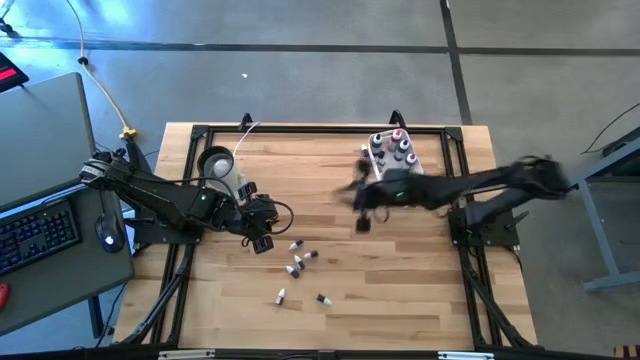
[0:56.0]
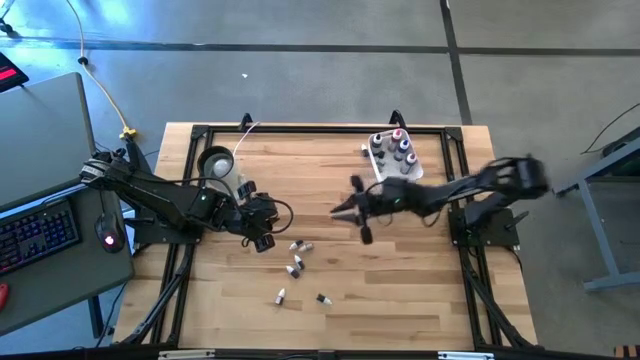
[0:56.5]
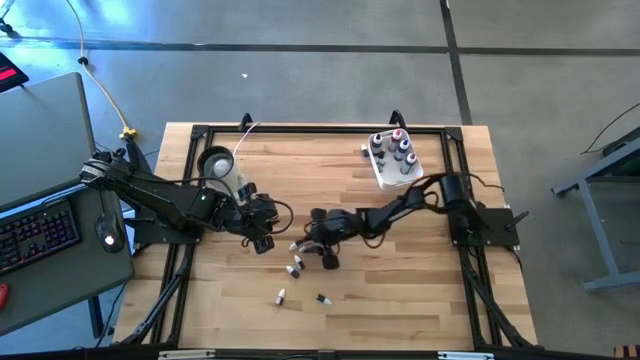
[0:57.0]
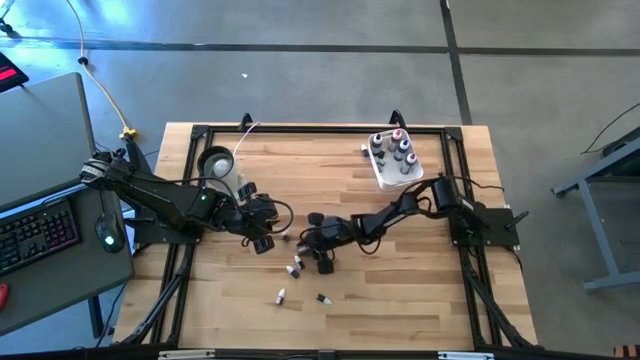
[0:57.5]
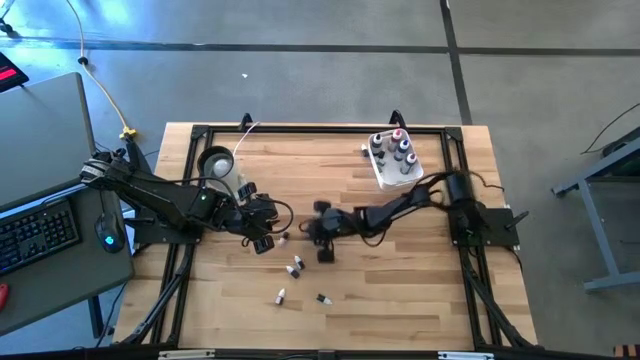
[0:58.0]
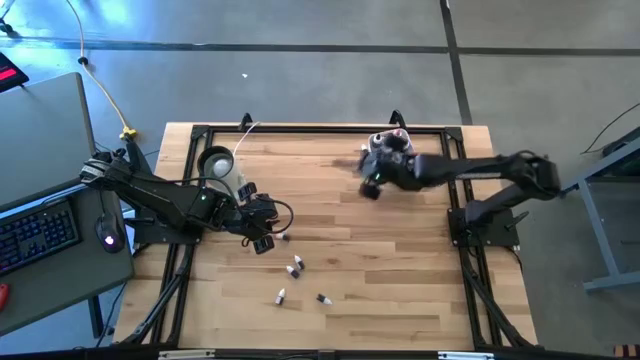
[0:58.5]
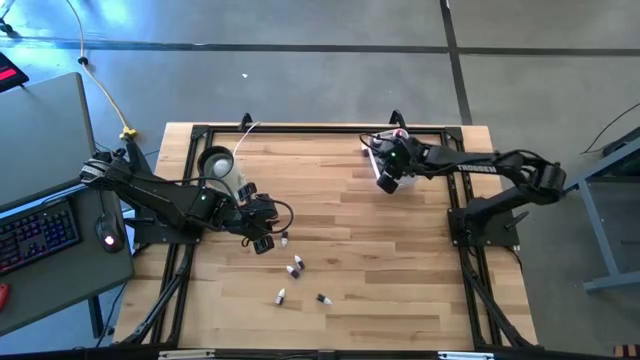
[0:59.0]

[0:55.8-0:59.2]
Task: Pick & Place food coloring
Put the bottom small violet food coloring bottle into the white bin

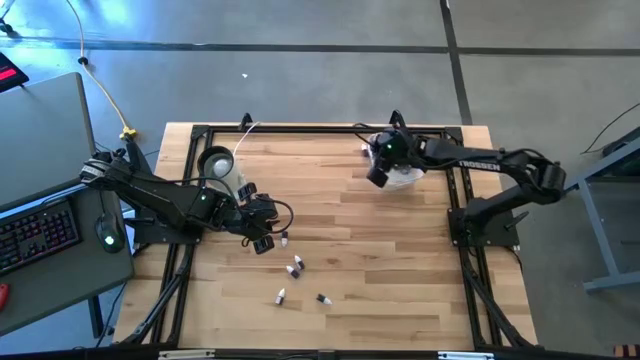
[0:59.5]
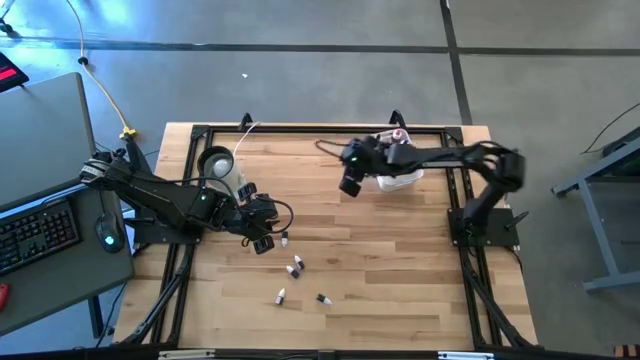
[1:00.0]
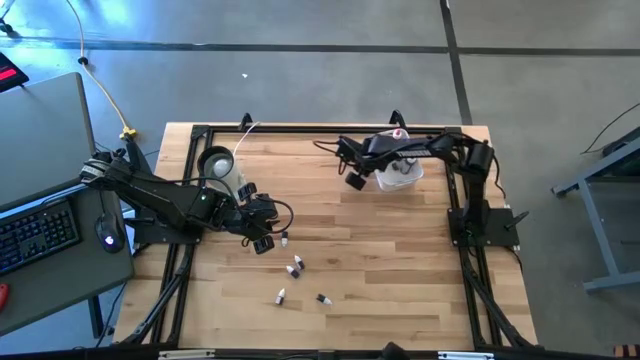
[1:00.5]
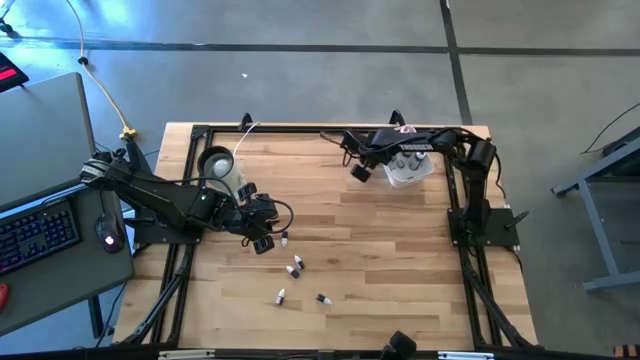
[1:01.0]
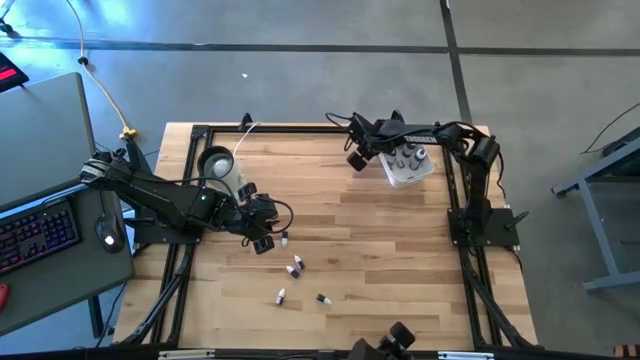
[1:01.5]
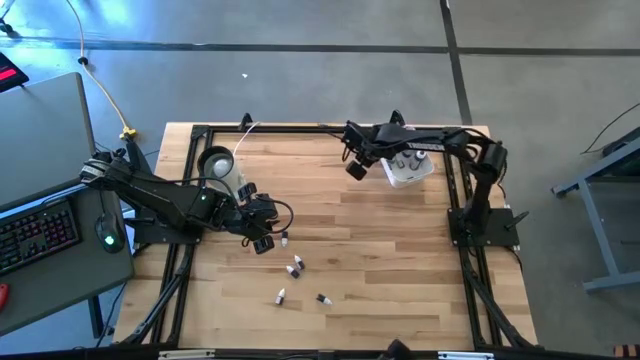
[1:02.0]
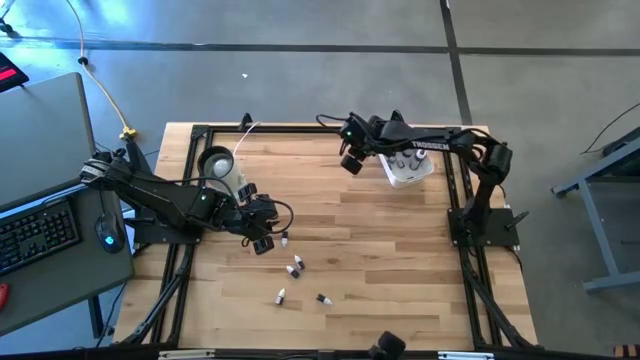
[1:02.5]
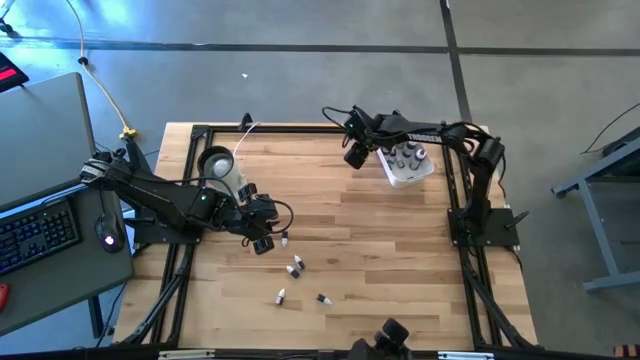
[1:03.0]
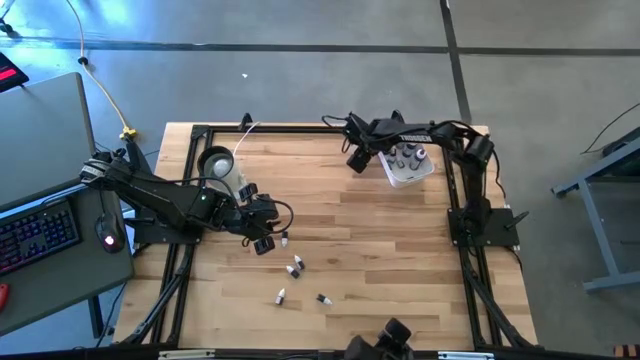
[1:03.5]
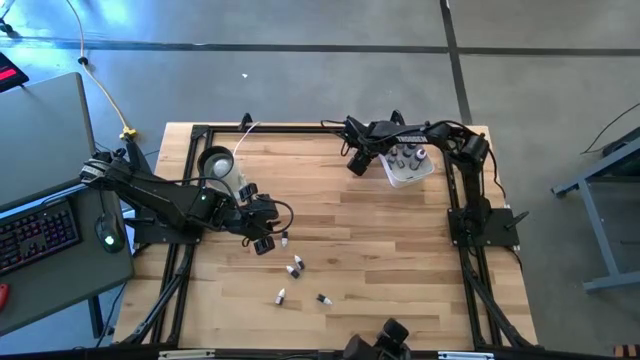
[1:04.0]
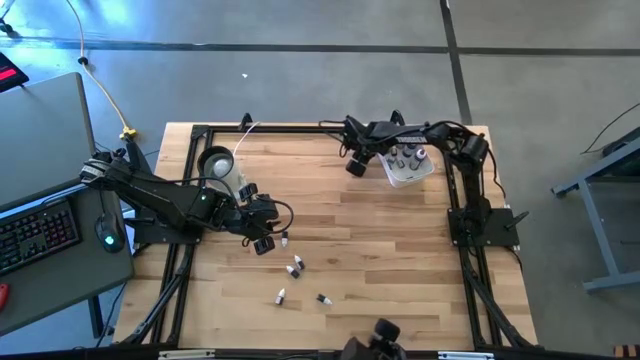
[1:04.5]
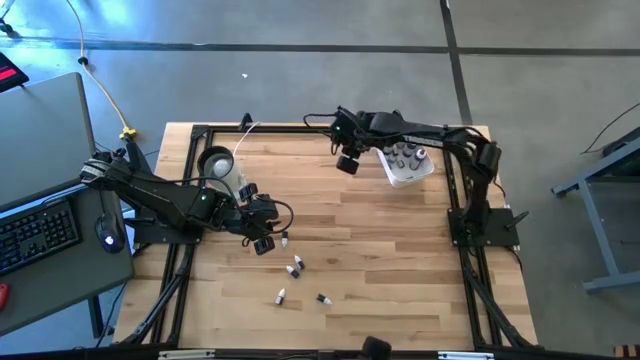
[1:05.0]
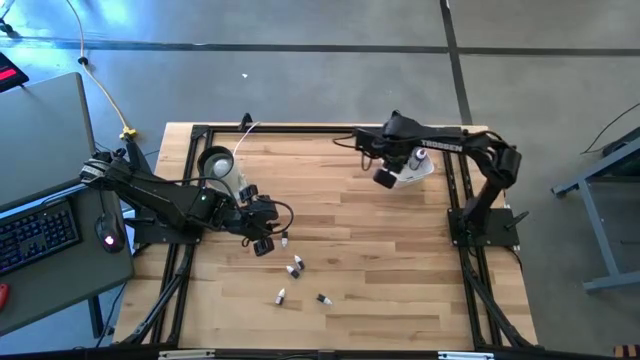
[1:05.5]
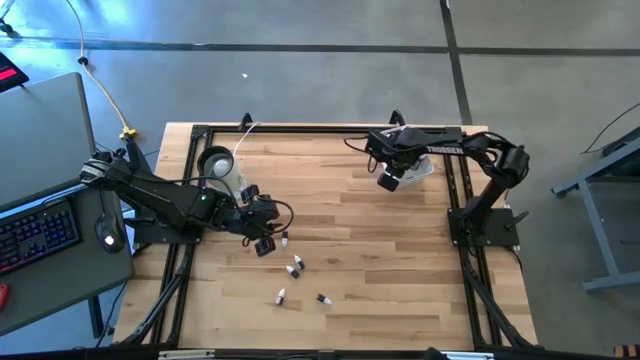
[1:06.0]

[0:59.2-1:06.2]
Put the small red food coloring bottle into the white bin

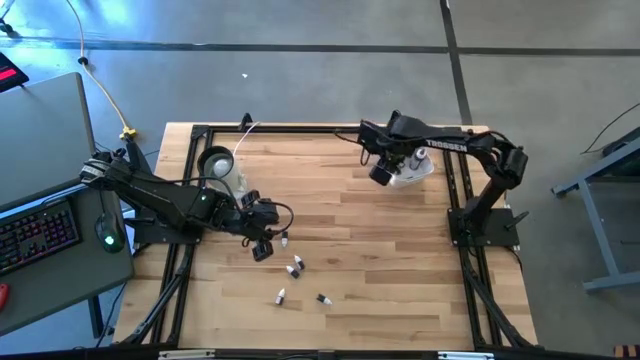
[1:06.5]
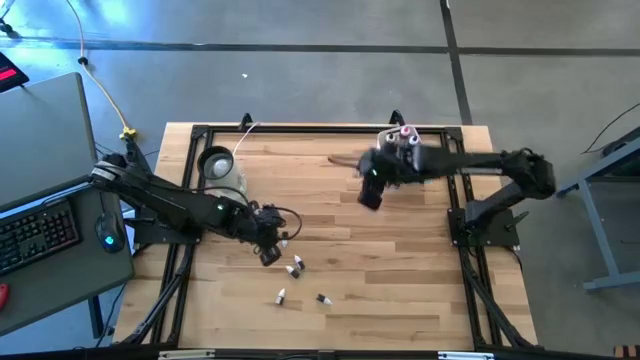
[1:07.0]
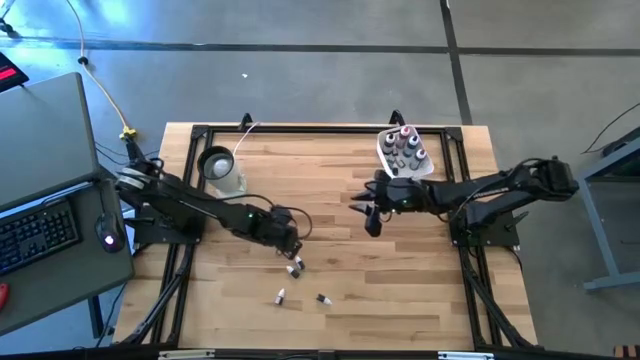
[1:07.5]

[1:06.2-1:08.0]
Put the small black food coloring bottle into the white bin

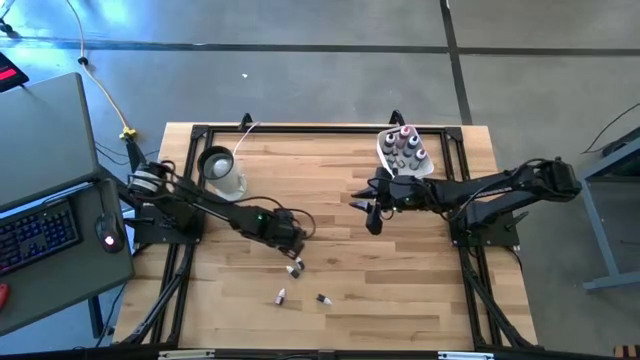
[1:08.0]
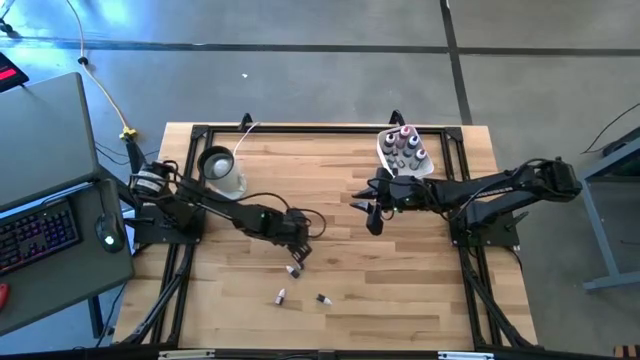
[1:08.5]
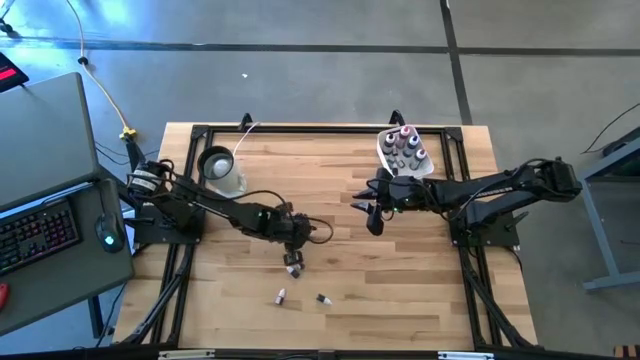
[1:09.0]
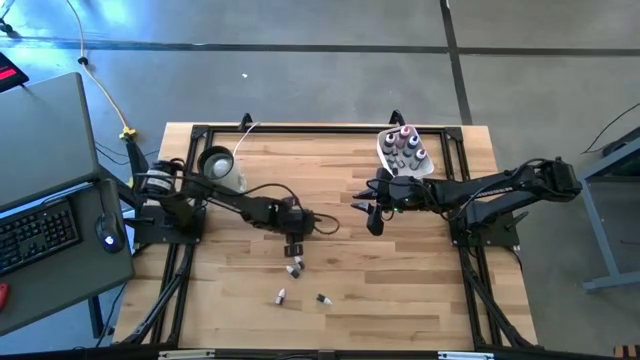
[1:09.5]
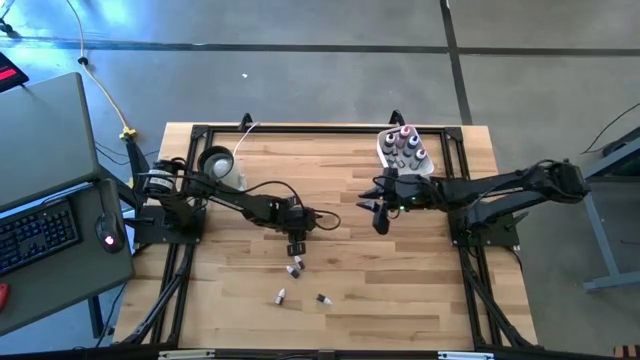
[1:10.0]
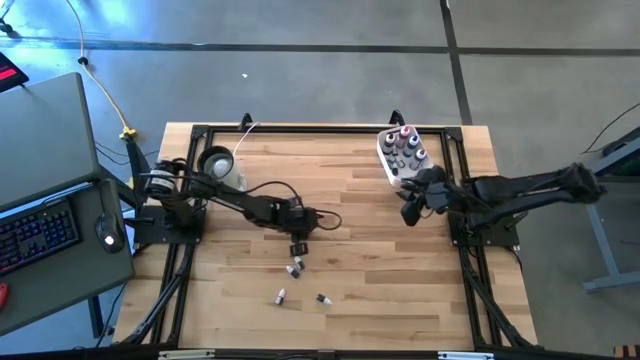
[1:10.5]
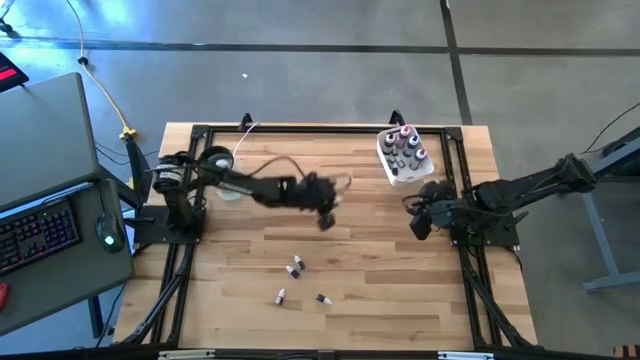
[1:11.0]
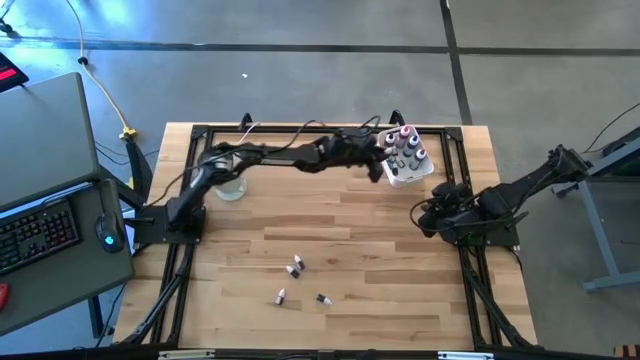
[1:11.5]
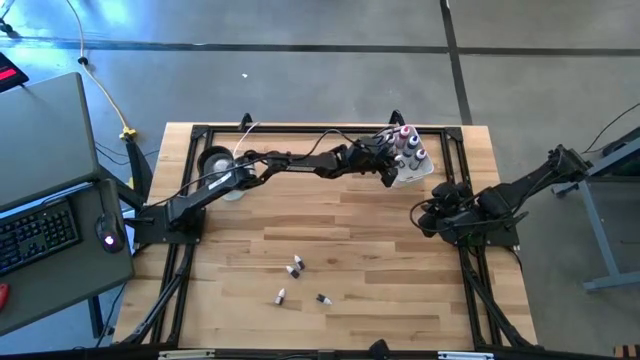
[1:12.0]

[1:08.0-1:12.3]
Put the top small black food coloring bottle into the white bin

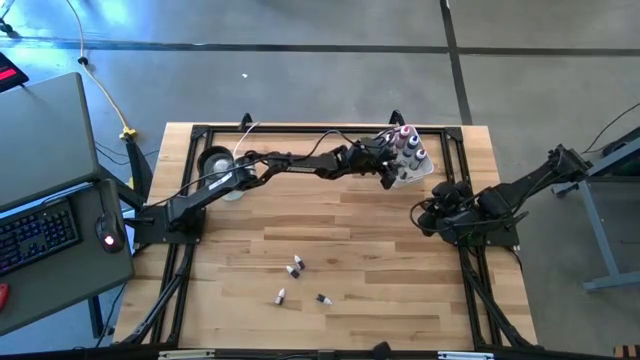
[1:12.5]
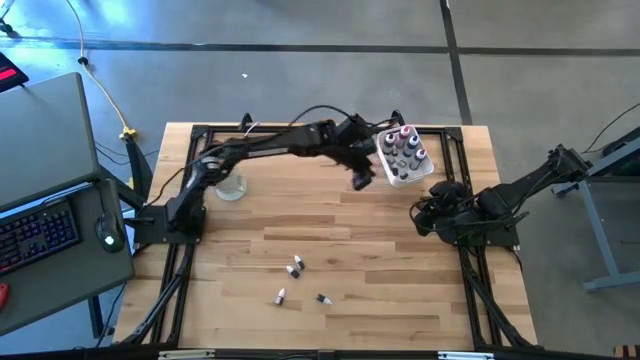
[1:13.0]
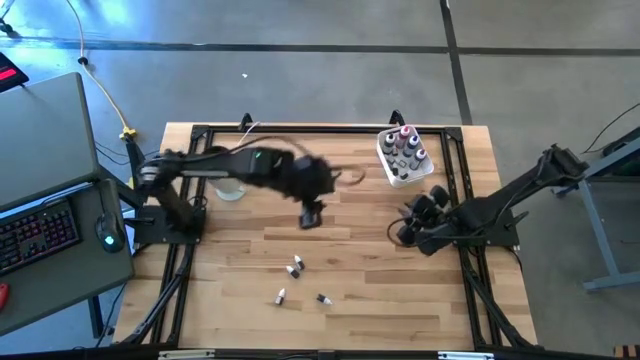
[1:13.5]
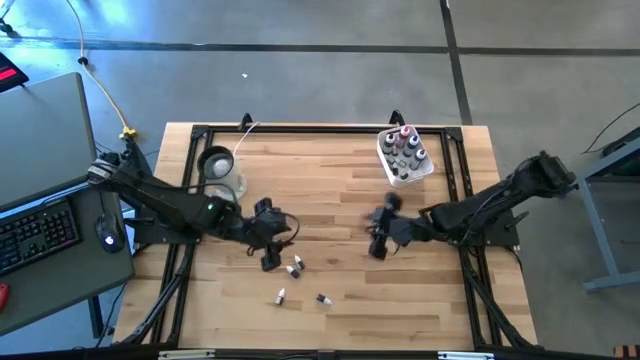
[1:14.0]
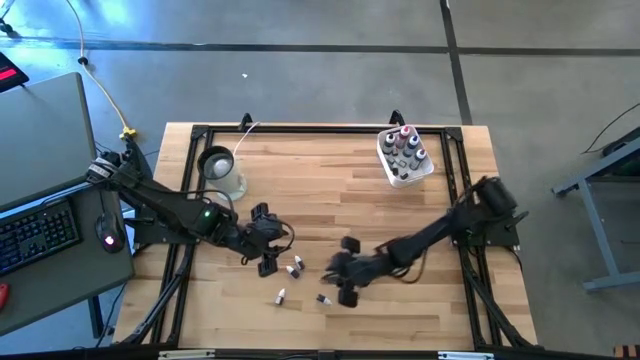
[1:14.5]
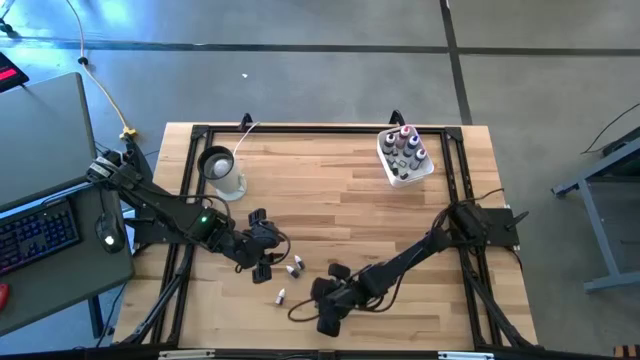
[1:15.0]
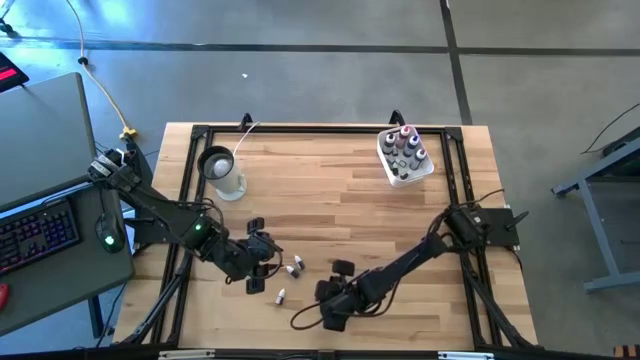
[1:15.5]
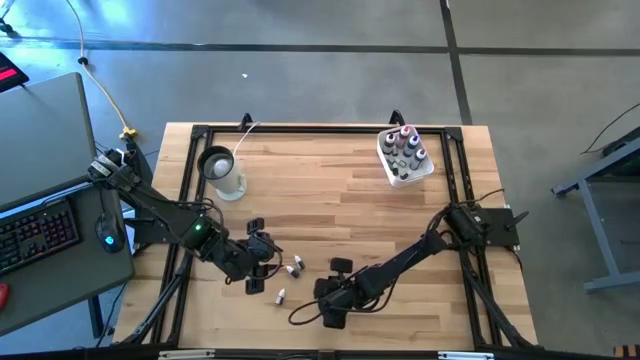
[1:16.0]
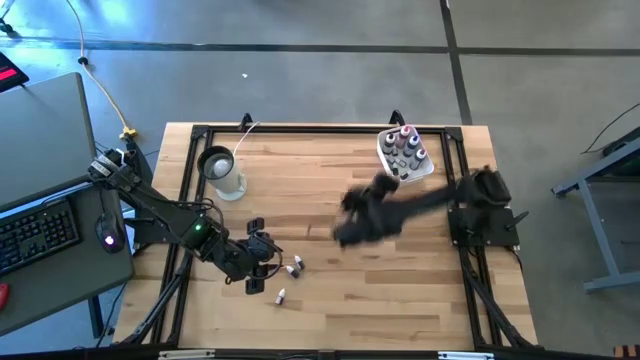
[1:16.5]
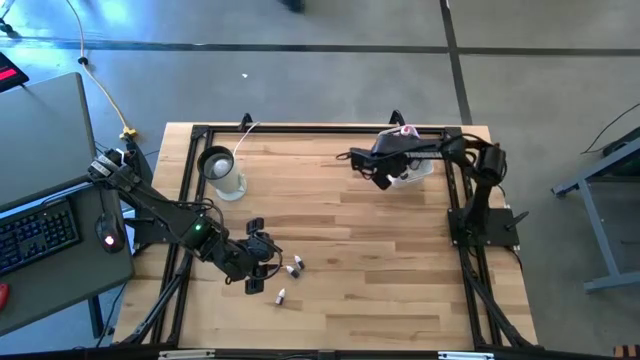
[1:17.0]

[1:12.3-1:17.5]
Put the small green food coloring bottle into the white bin

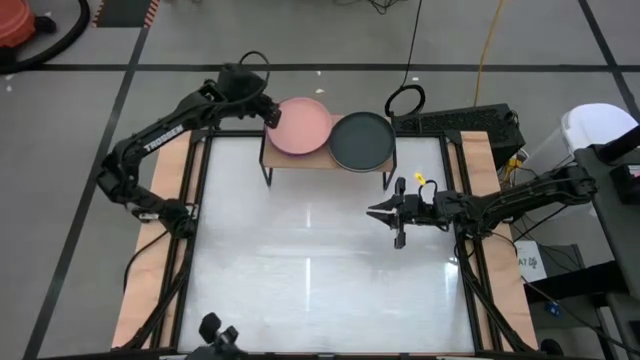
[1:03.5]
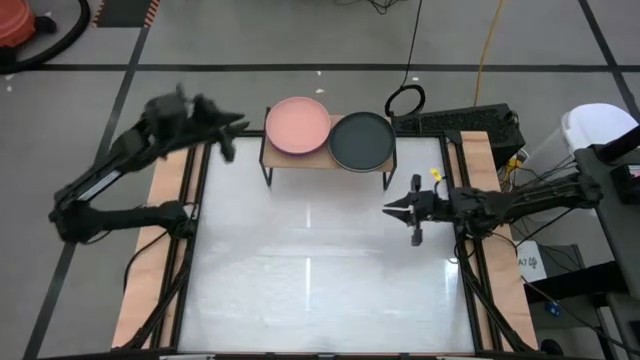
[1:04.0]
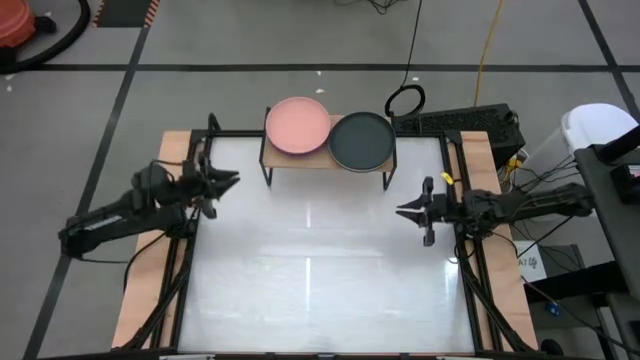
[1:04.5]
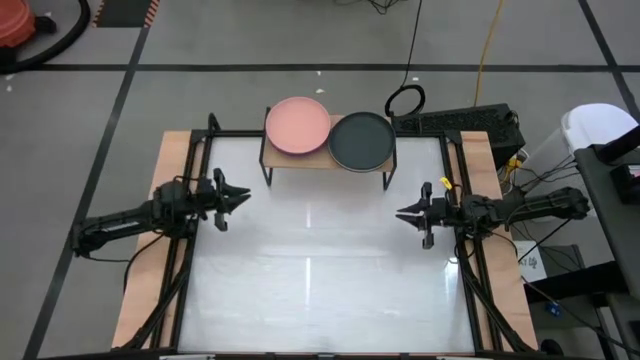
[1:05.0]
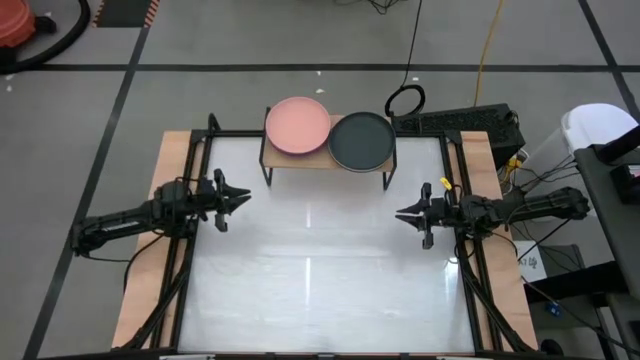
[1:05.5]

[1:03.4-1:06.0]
Task: Place and stack plates onto a shelf
Return to Home Position
